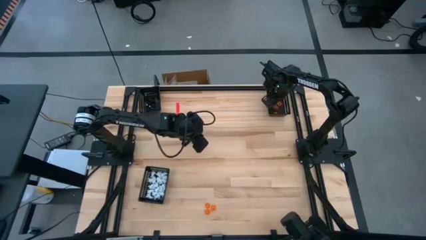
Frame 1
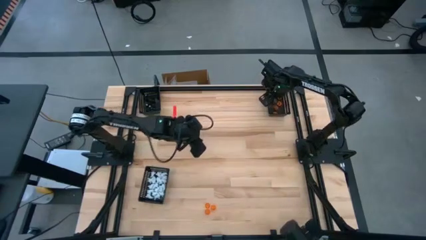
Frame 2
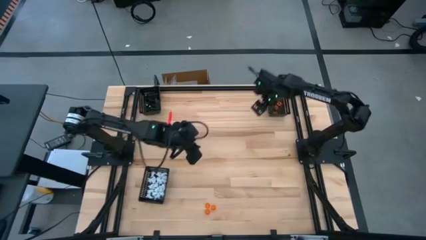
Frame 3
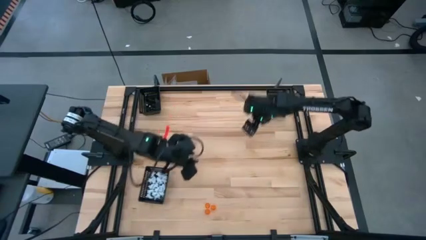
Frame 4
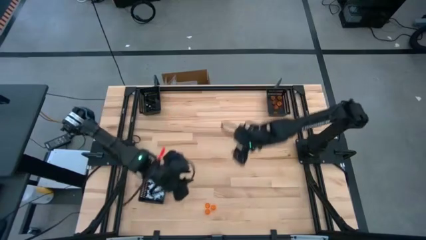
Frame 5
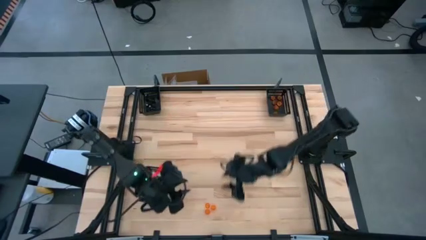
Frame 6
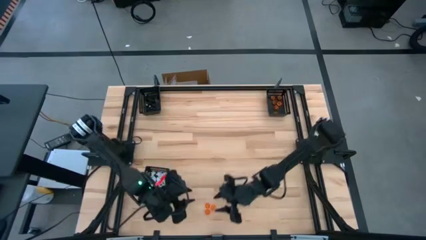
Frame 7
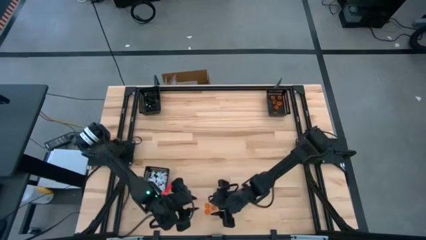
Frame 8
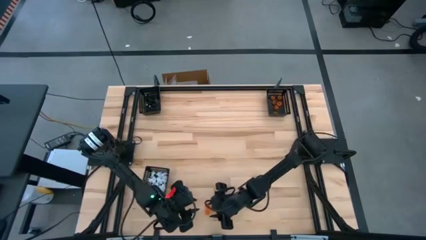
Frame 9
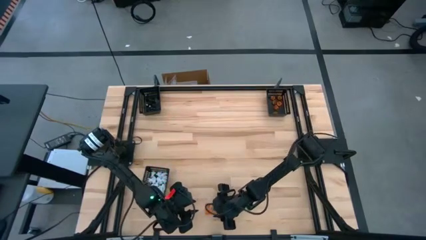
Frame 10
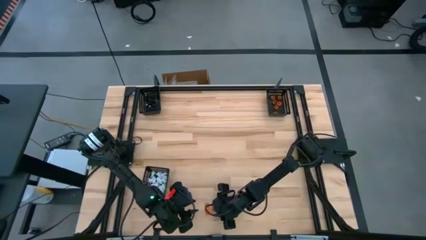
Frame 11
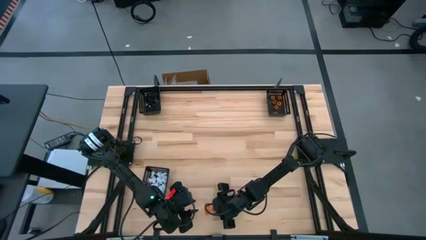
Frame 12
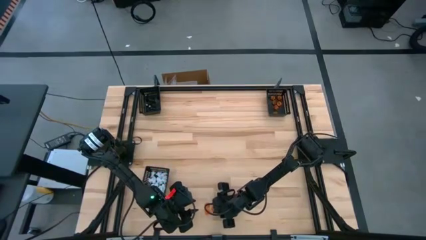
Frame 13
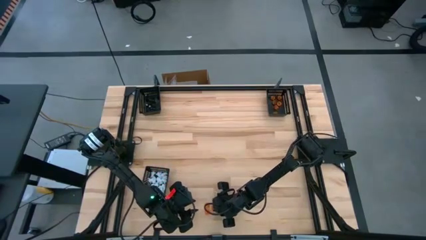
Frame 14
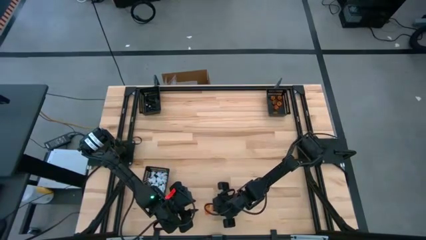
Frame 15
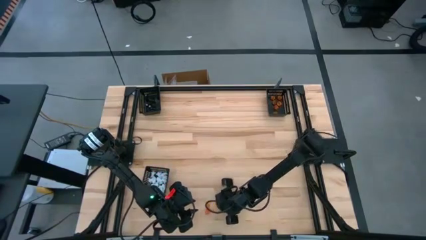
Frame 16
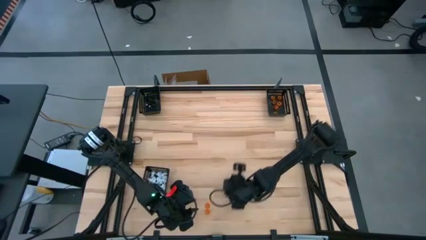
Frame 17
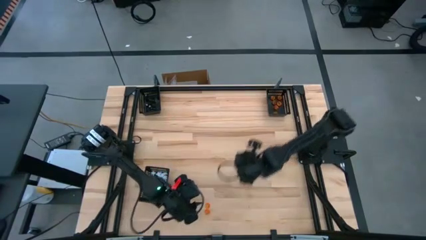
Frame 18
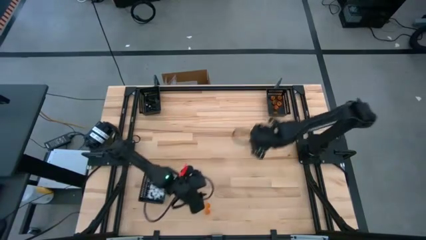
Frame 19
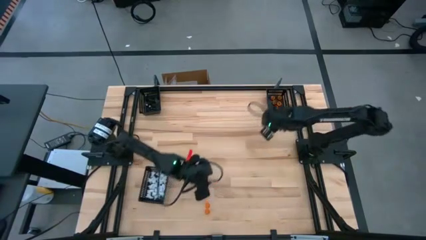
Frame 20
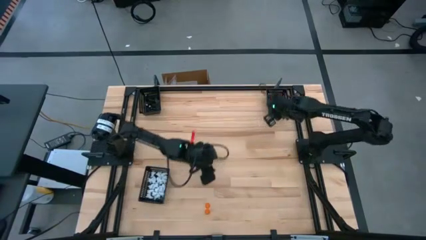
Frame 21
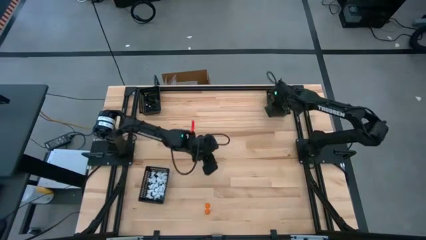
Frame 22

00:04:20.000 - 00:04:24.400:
Task: Sort Halloween decoration
Put the orange pumpkin toy into the top right black basket

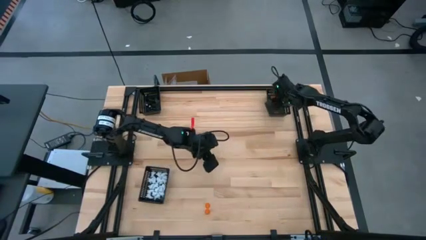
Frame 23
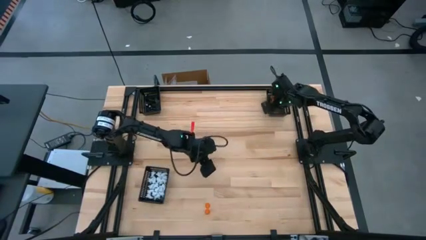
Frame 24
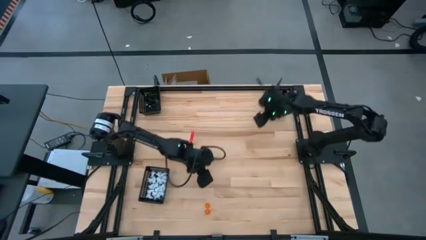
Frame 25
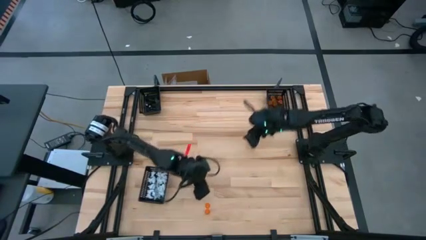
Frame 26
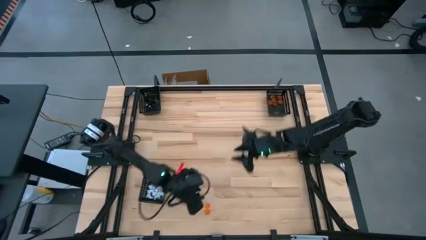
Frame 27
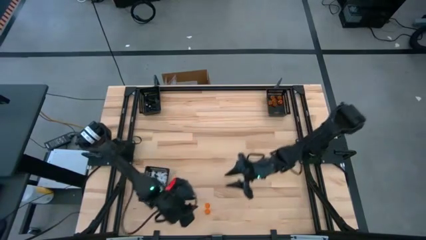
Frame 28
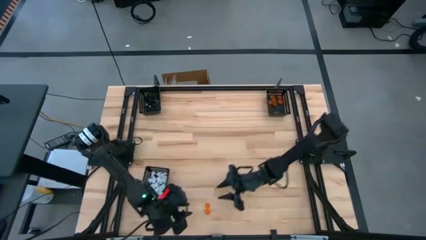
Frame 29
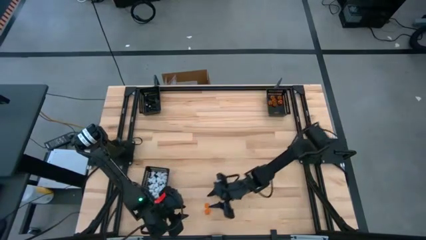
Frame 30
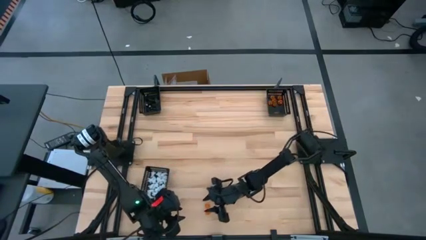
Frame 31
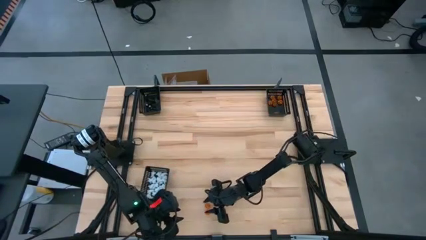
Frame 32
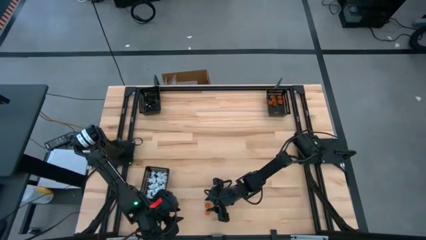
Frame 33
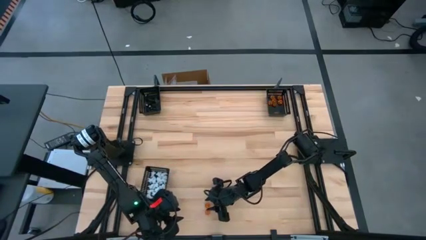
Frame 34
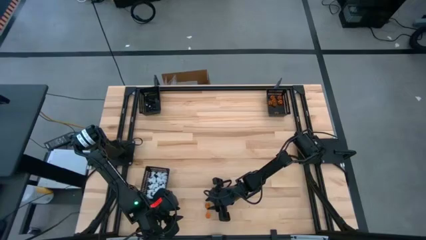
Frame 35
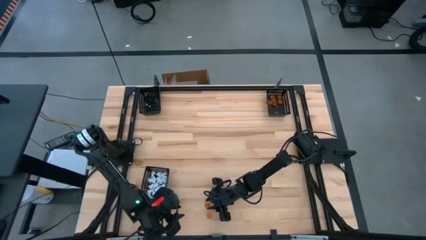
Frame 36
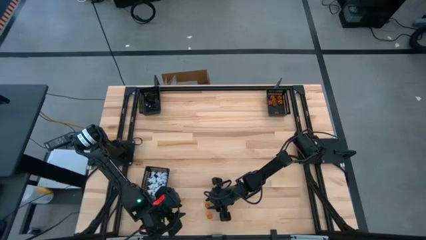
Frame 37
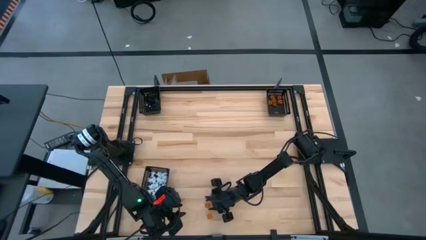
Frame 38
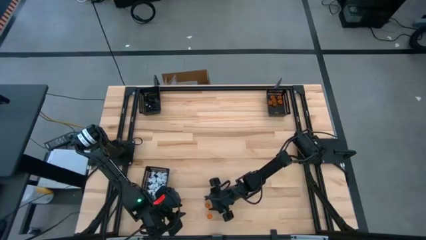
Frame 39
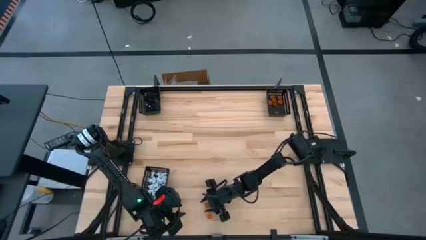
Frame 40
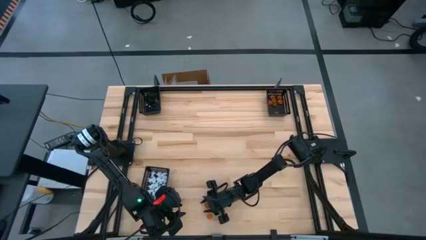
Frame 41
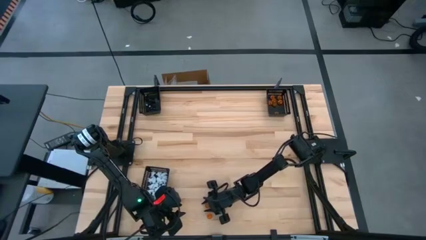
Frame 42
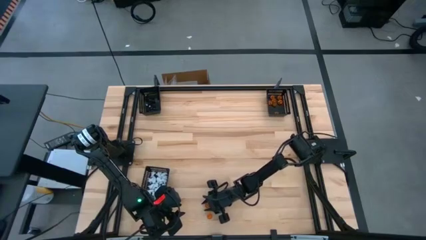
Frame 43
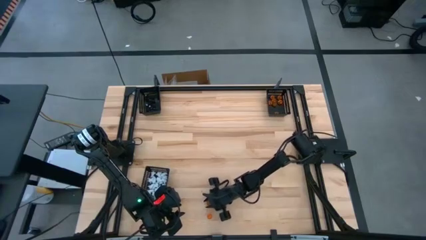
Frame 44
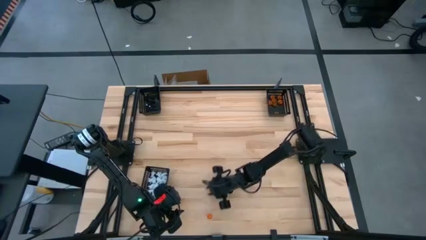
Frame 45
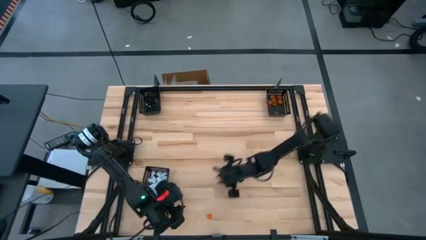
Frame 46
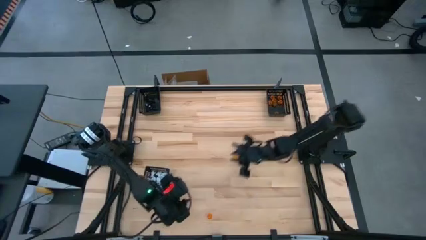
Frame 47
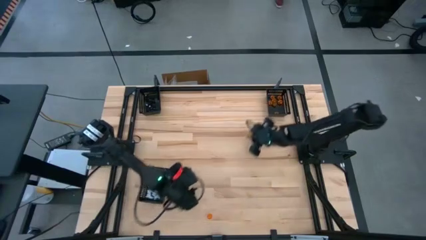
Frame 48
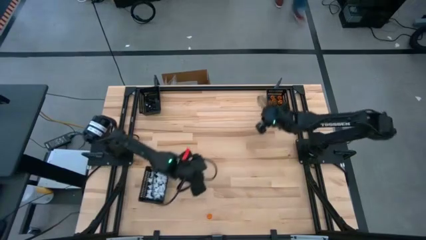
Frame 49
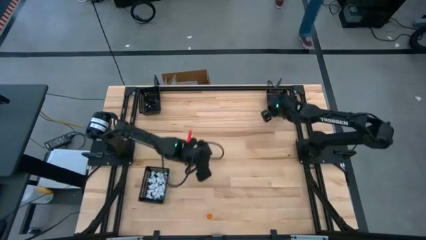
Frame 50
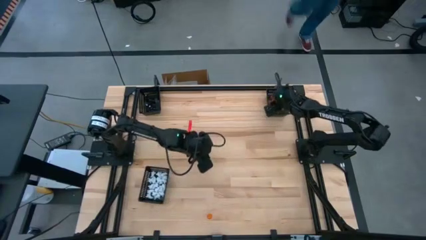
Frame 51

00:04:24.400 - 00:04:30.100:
Put the orange pumpkin toy into the top right black basket

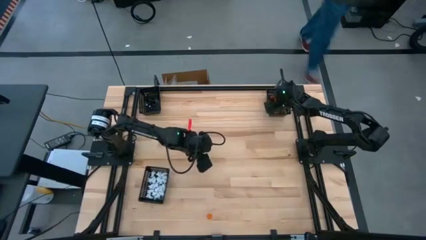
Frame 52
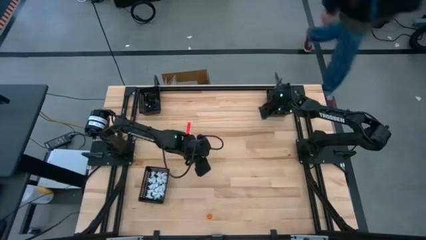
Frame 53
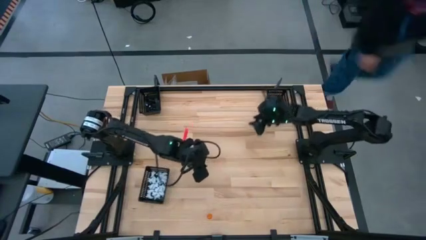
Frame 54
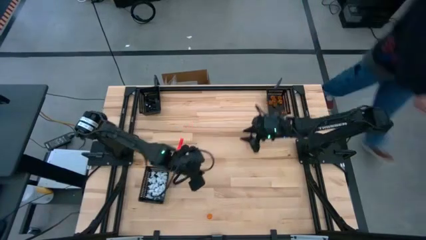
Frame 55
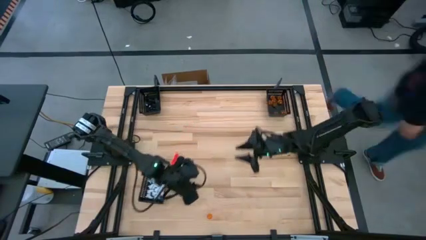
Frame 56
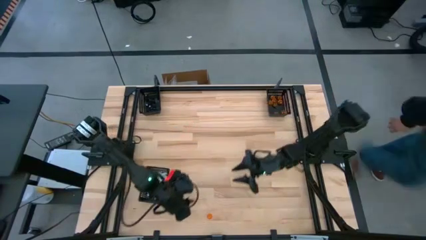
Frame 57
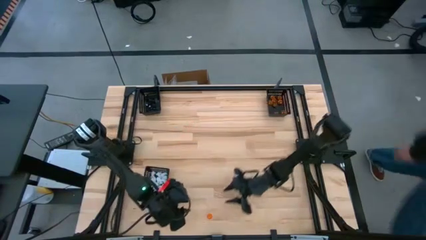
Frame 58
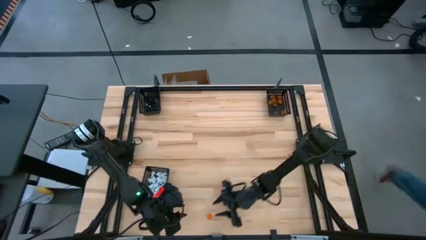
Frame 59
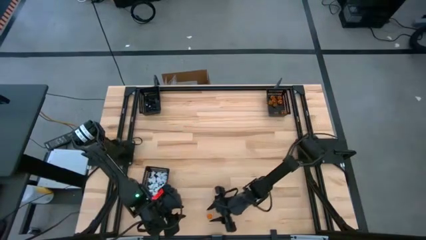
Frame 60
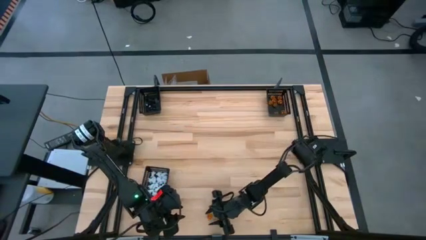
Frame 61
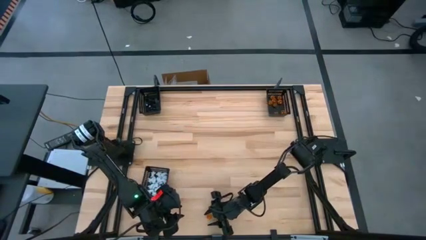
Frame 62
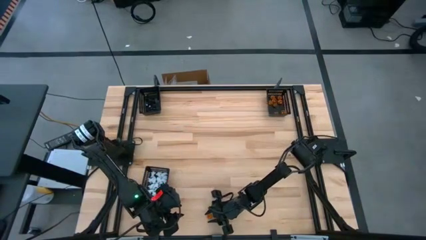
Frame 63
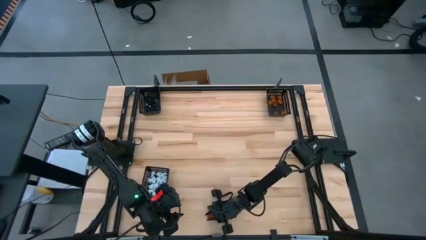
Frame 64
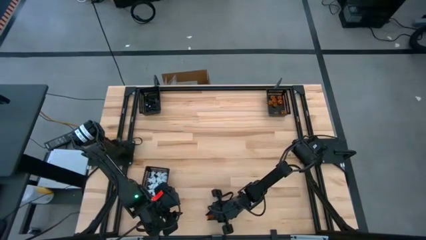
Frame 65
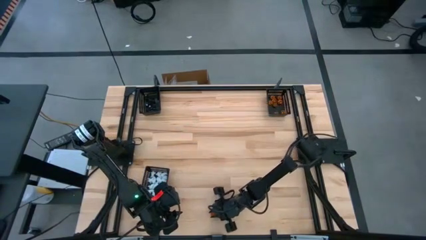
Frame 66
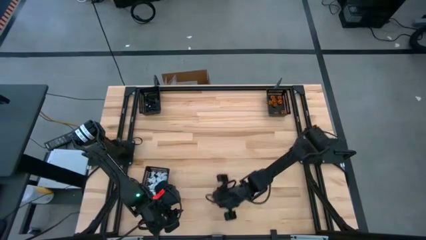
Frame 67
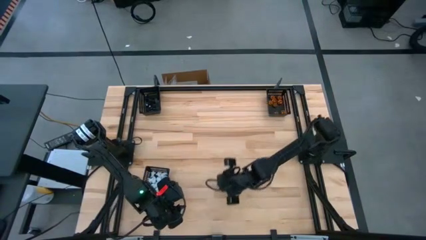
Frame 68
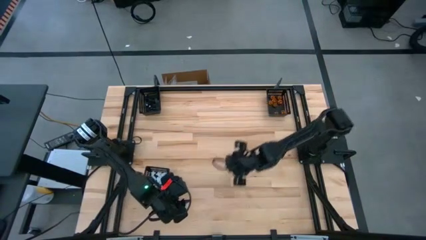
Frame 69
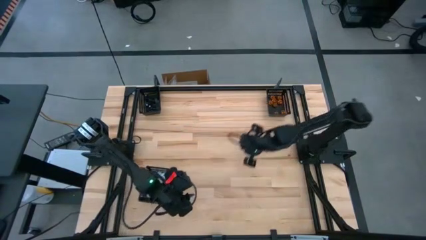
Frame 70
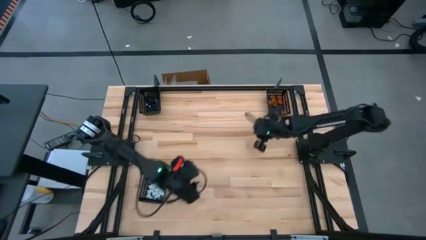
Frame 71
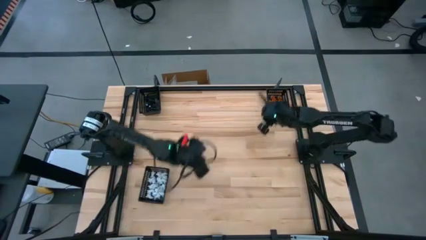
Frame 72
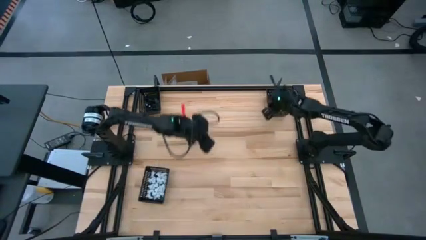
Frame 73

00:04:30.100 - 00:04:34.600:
Put the orange pumpkin toy into the top right black basket

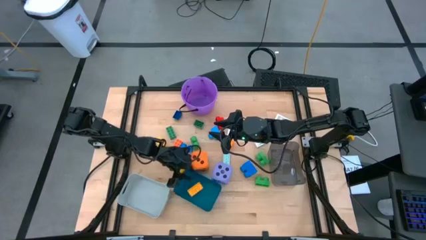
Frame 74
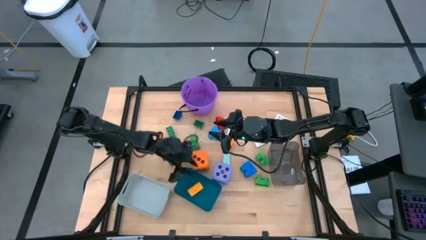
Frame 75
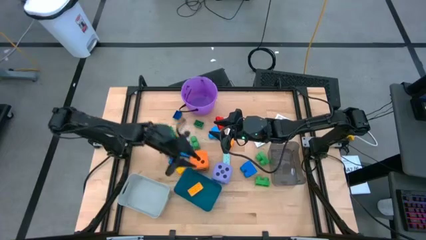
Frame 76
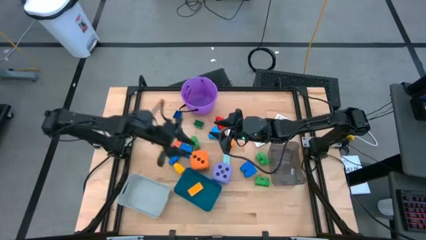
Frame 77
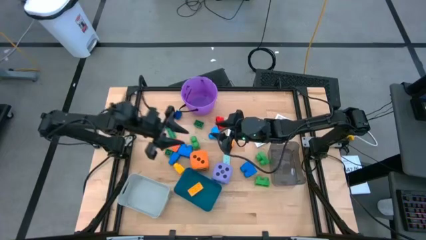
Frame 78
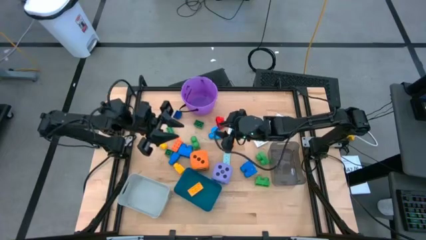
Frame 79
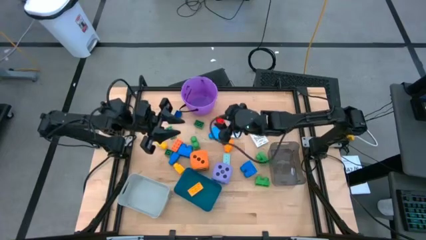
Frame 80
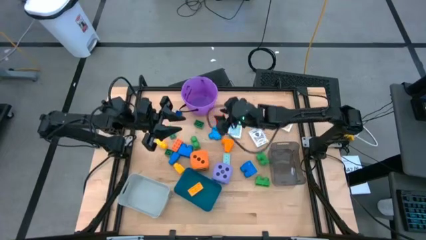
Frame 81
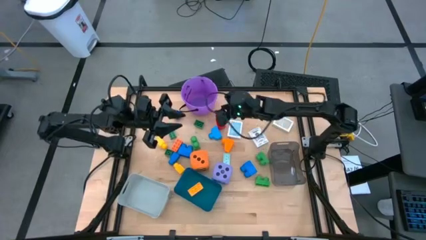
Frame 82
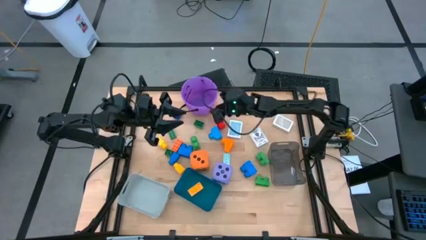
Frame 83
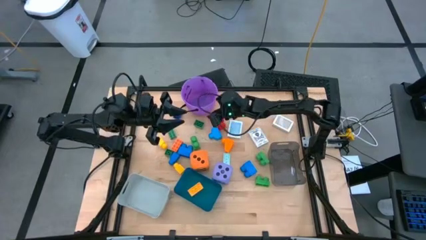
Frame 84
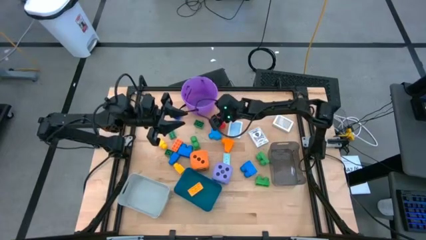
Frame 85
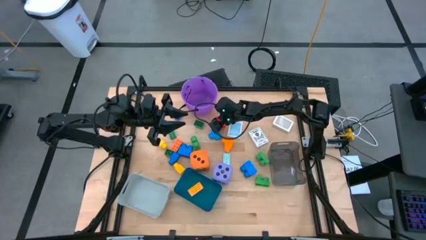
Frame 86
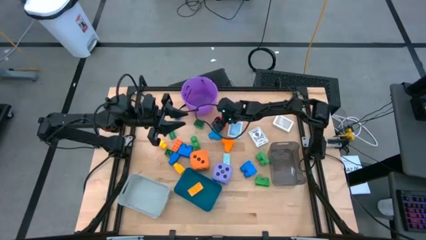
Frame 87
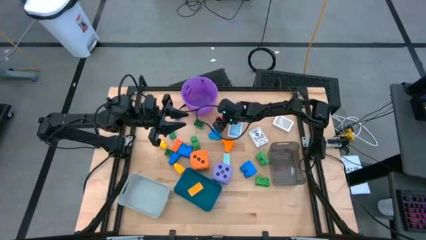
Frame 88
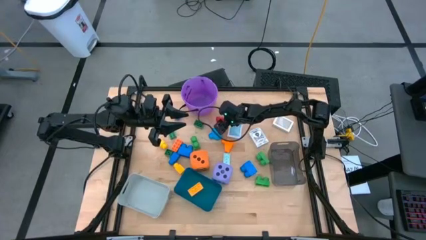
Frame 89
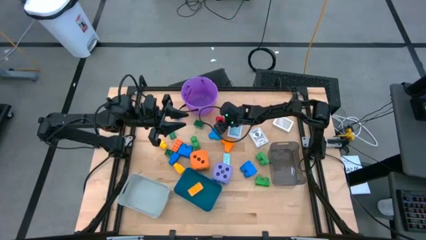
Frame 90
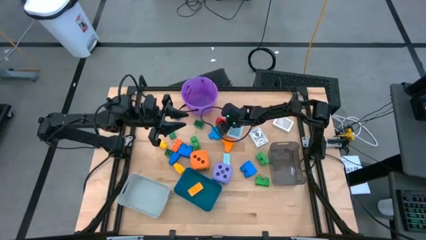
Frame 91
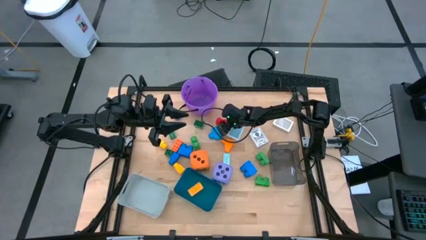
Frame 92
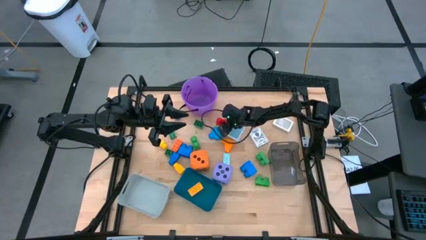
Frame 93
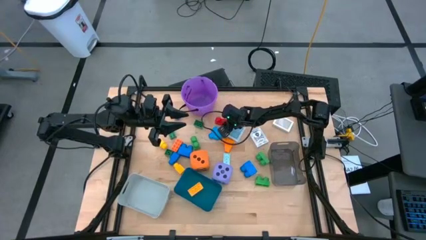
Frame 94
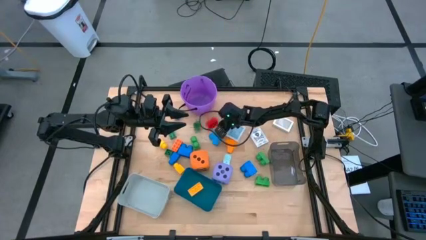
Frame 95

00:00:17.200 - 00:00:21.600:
Task: Pick & Place Toys
Put the blue game piece into the blue bin
